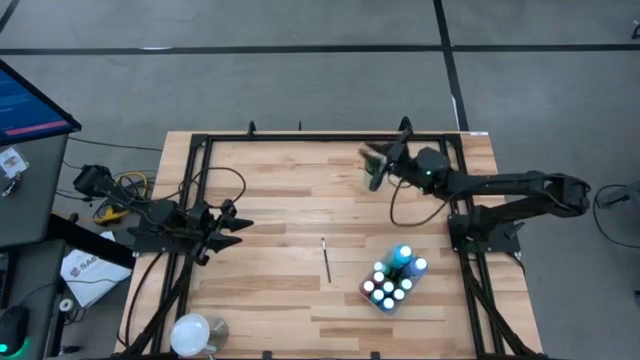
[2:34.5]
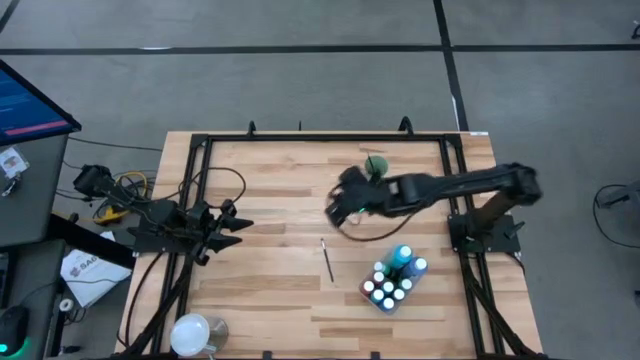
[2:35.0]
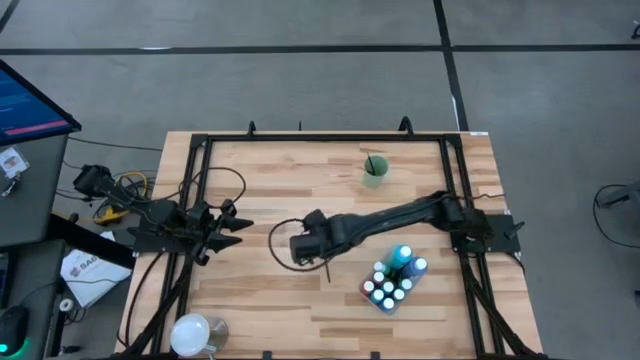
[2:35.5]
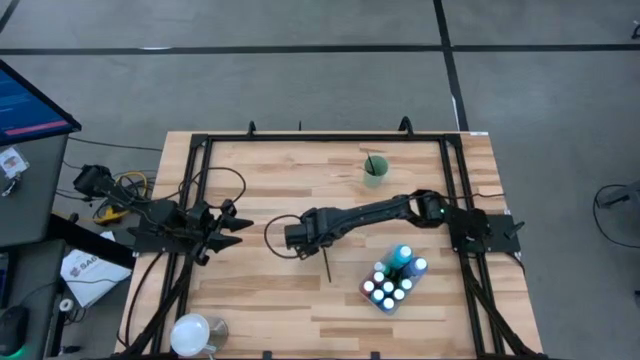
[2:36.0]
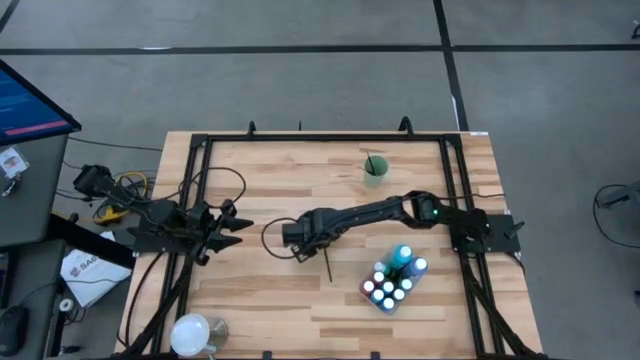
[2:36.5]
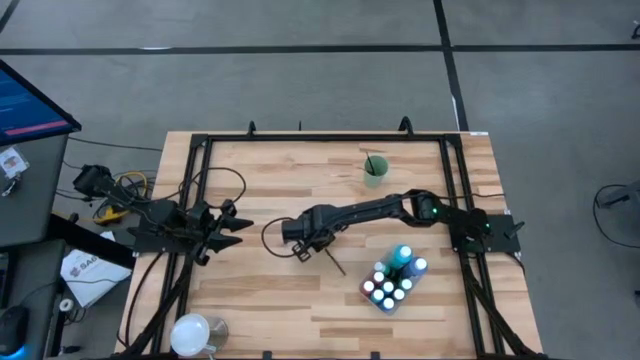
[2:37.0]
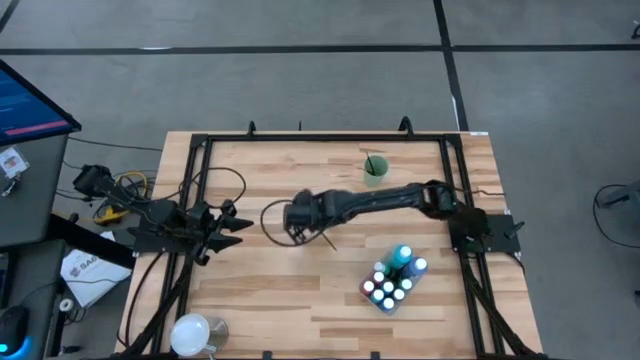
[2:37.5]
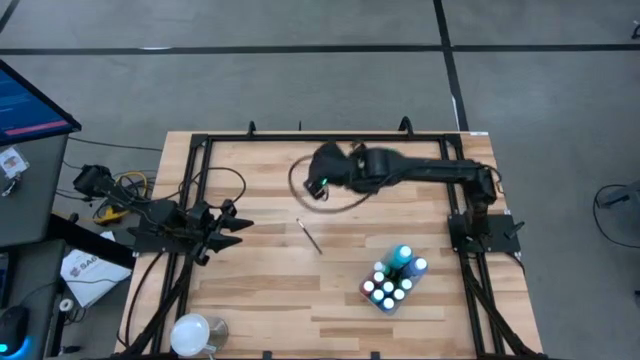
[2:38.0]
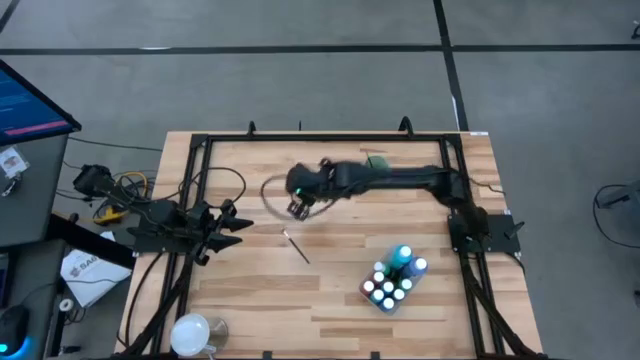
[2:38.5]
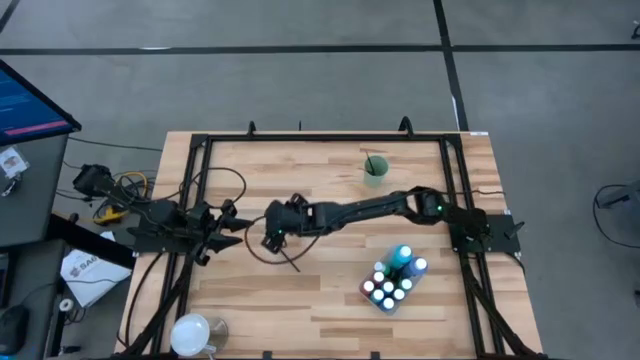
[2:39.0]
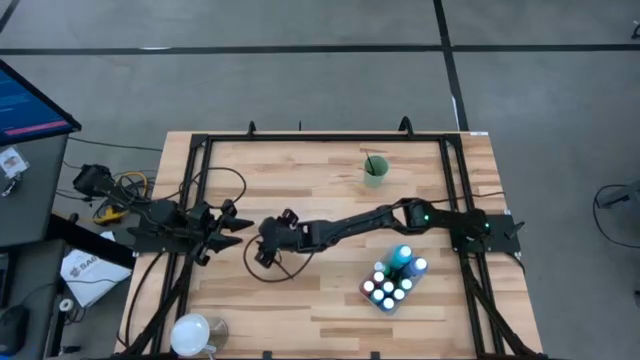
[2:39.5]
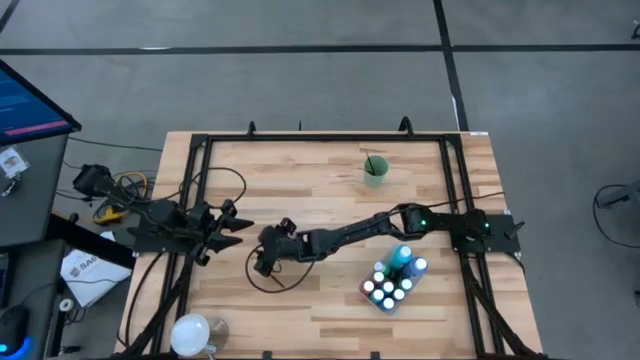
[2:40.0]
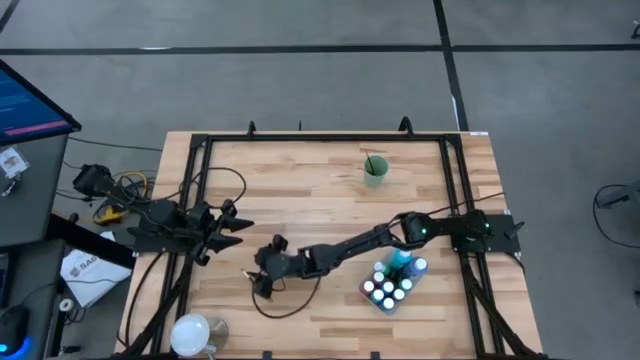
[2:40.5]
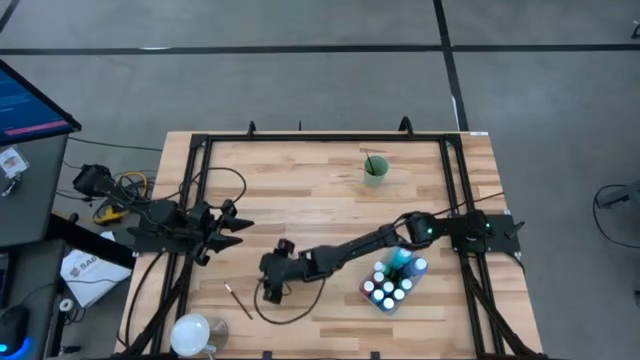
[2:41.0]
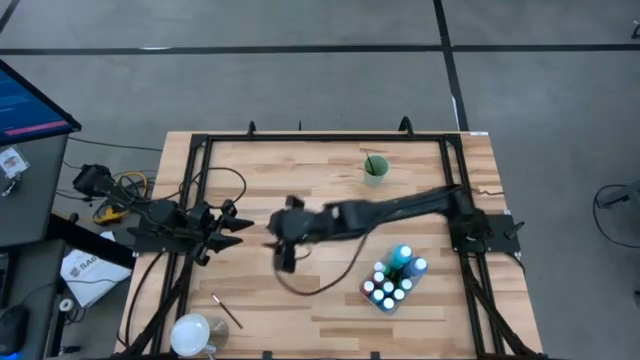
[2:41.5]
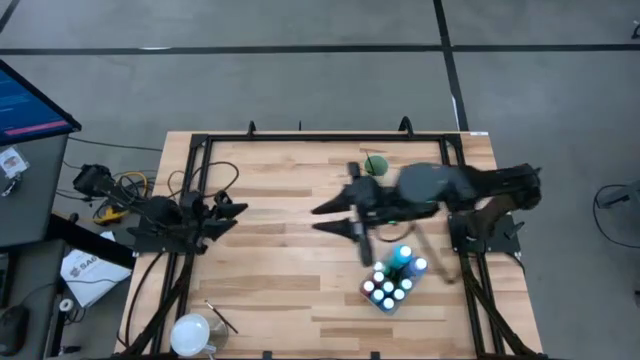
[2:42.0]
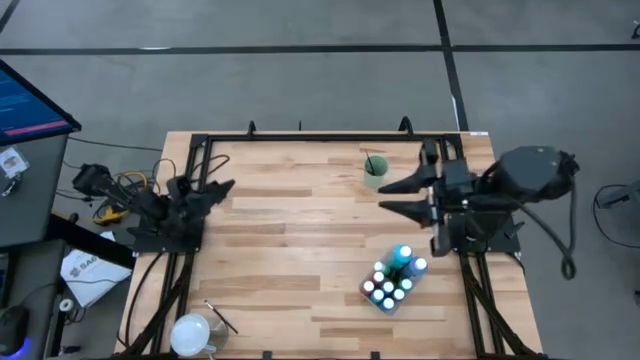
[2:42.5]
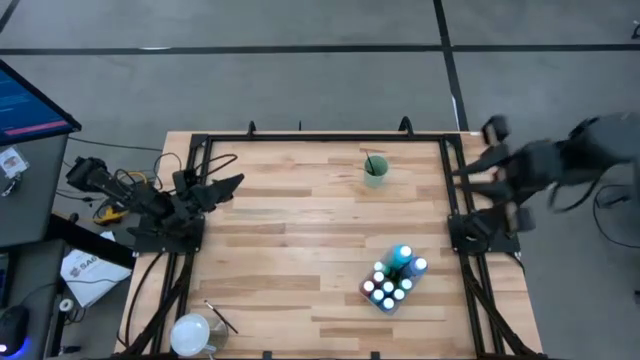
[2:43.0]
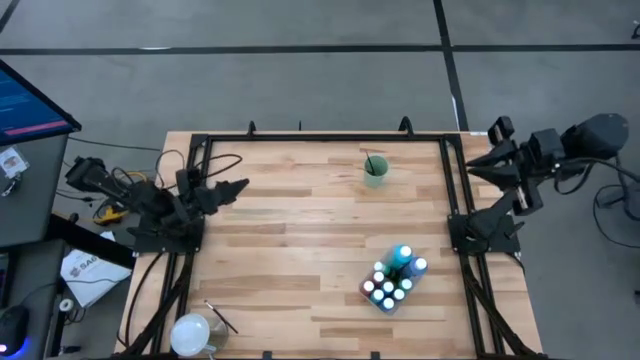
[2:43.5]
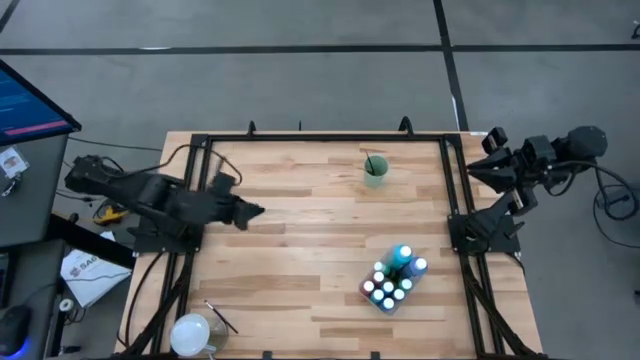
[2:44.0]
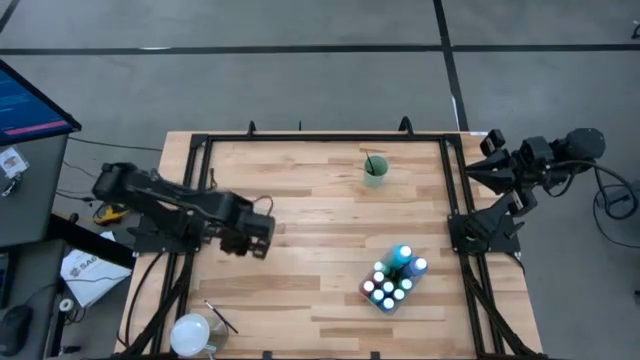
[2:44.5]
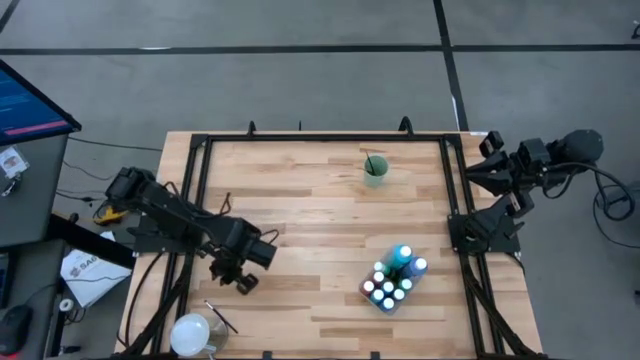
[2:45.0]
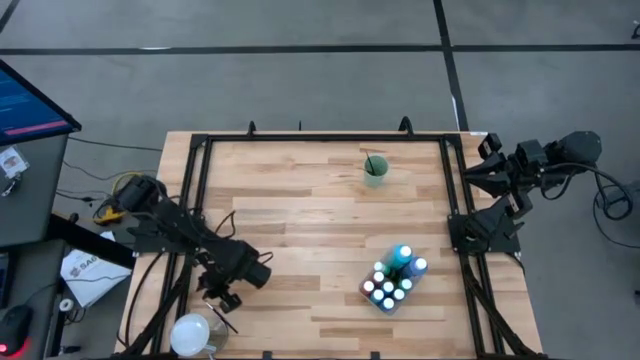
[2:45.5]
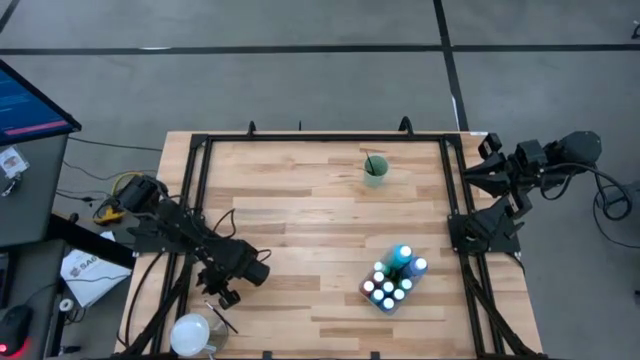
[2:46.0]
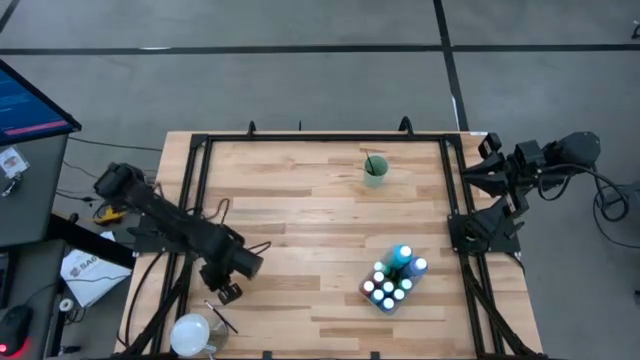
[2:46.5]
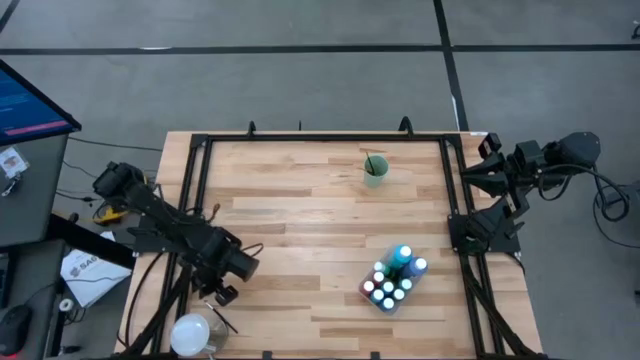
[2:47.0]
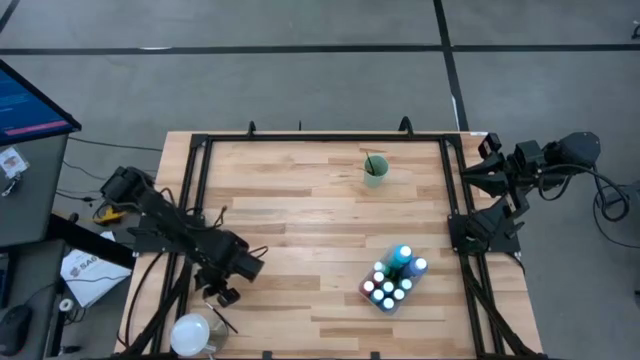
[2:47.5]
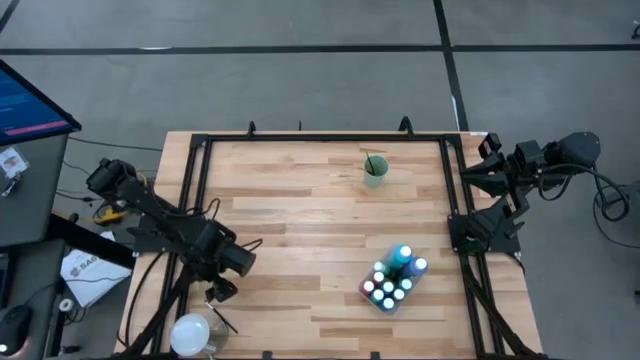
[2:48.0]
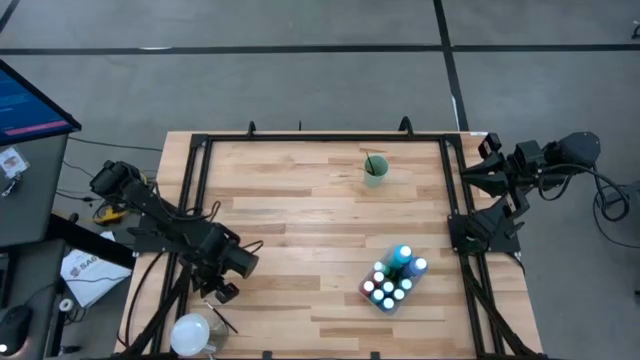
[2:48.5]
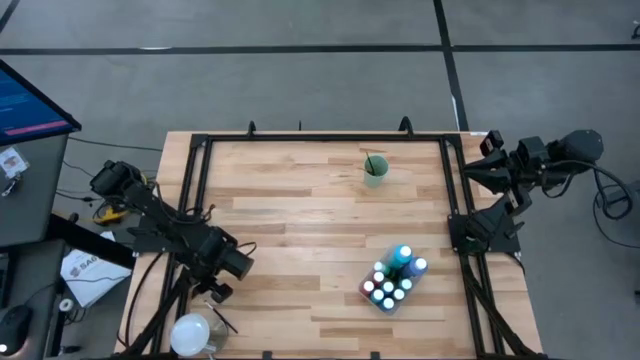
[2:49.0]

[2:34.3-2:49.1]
Task: Pick & Place Paint Supplies
Put the black paint brush into the green cup
